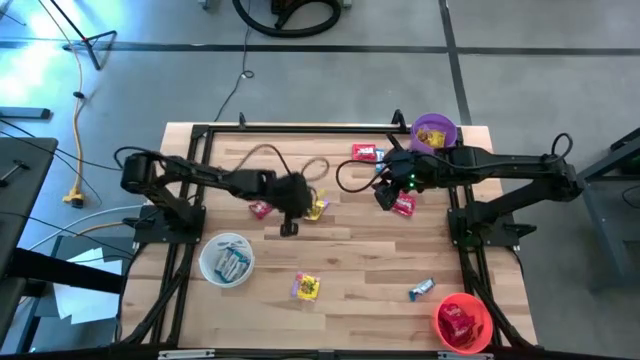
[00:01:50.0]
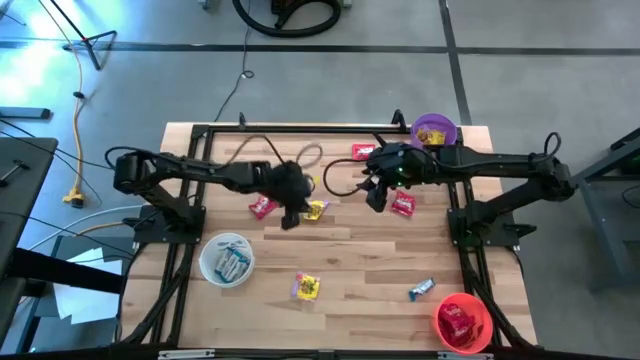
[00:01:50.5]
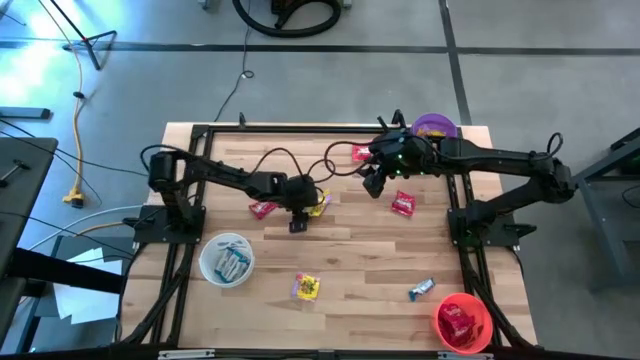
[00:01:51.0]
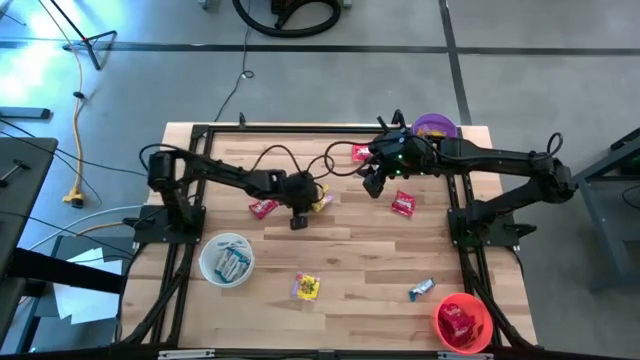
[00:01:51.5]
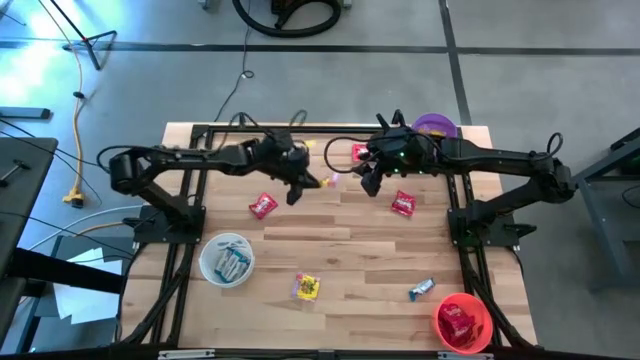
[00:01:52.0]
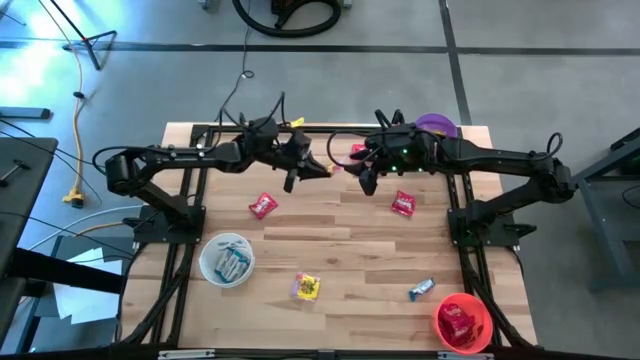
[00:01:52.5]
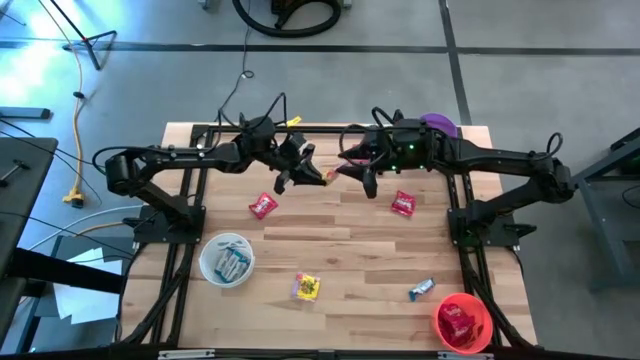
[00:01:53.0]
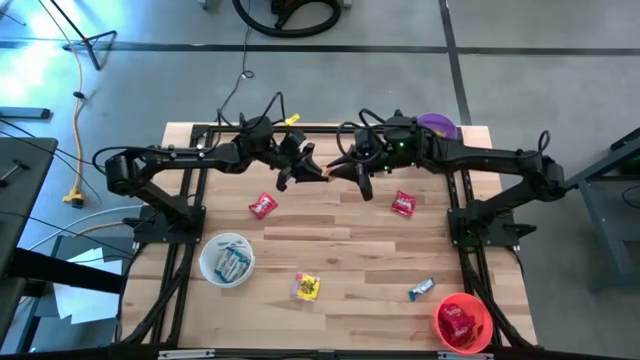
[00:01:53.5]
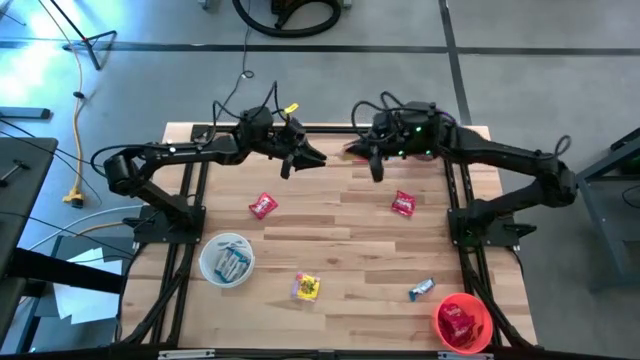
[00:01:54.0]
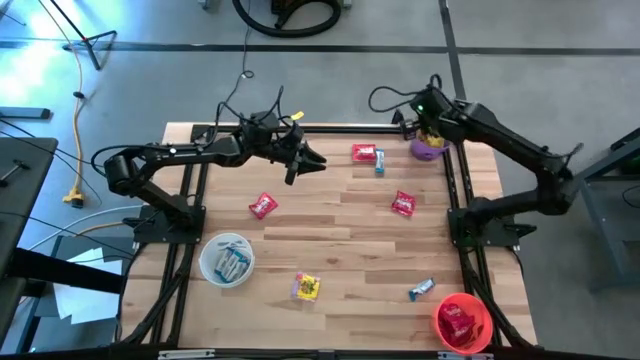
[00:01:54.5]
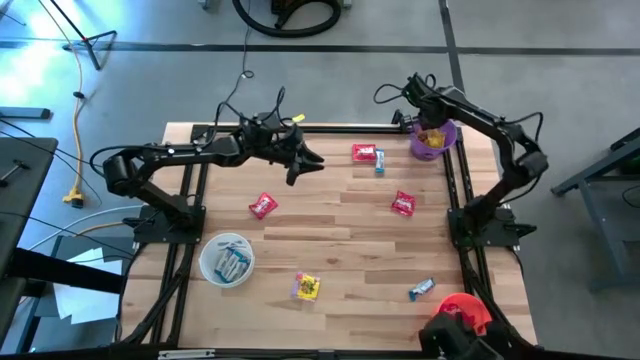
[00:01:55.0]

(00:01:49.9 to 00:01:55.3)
Task: Sort candy
Put the yellow candy into the purple bin

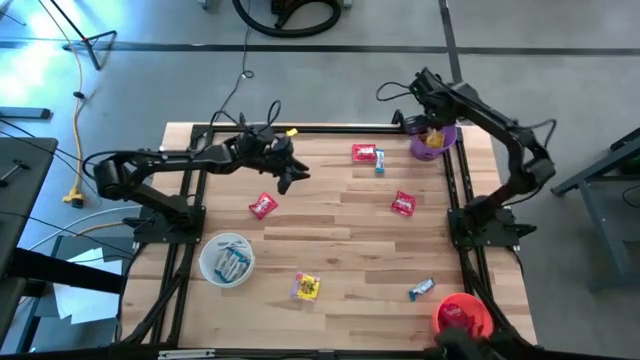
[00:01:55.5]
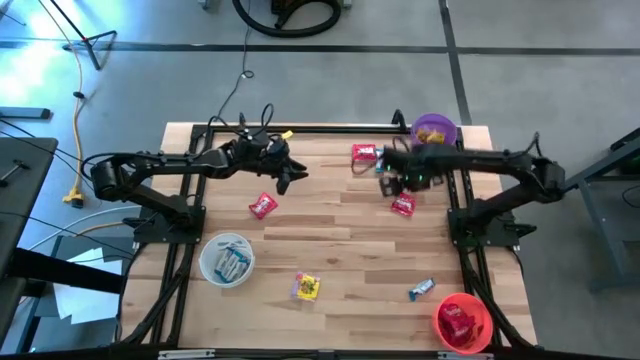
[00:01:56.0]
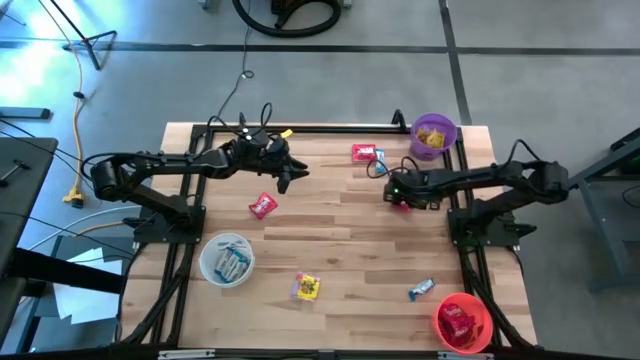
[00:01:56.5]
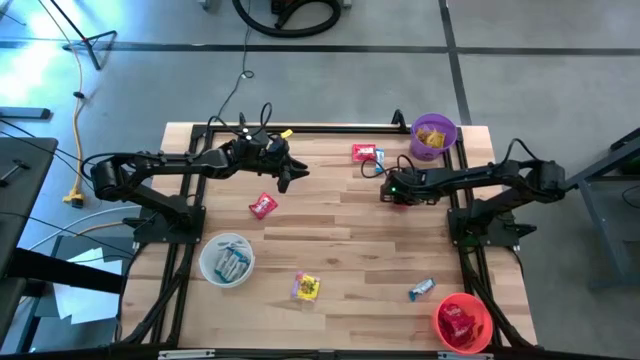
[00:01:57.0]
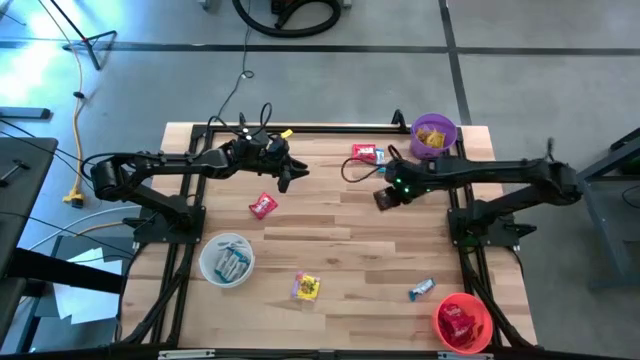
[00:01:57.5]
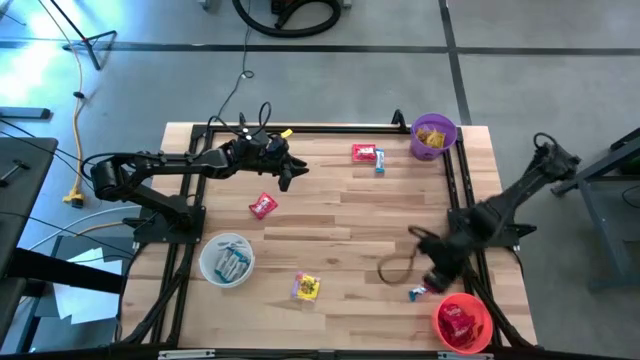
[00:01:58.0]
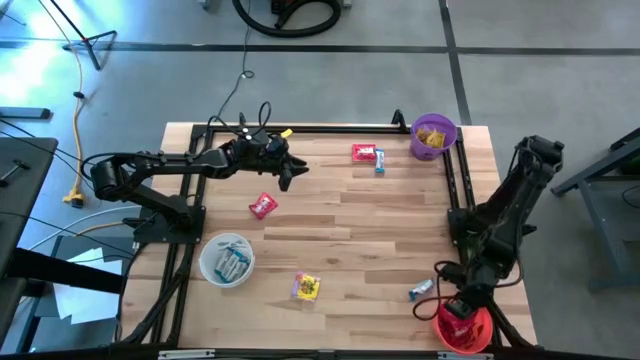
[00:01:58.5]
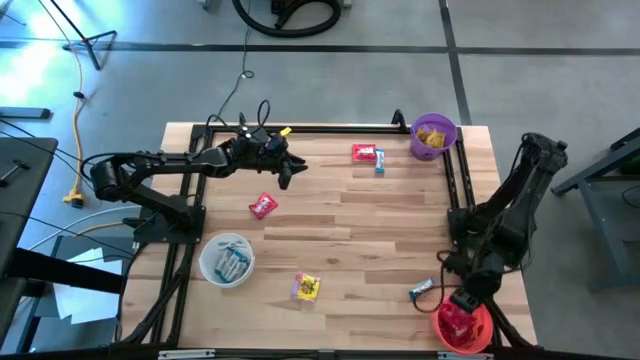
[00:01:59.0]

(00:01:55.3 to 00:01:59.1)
Put the red candy into the orange bin

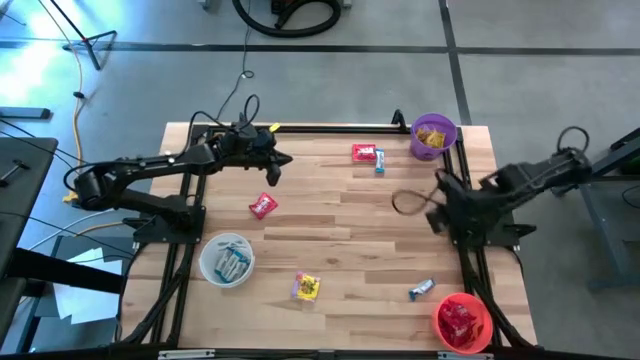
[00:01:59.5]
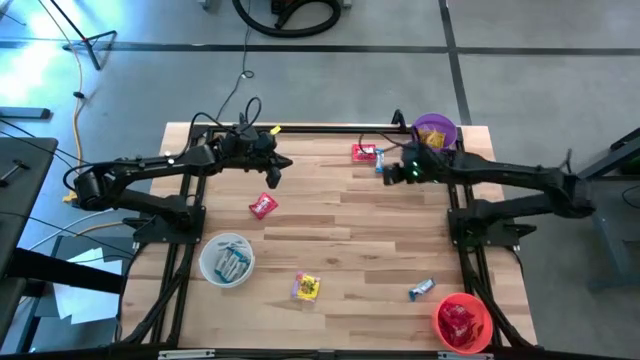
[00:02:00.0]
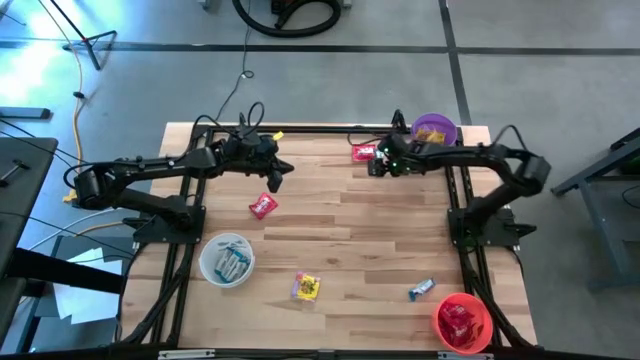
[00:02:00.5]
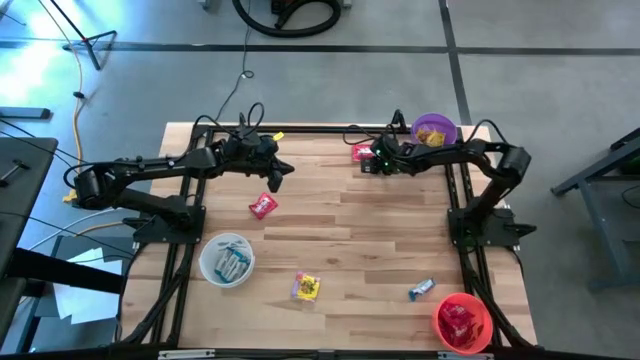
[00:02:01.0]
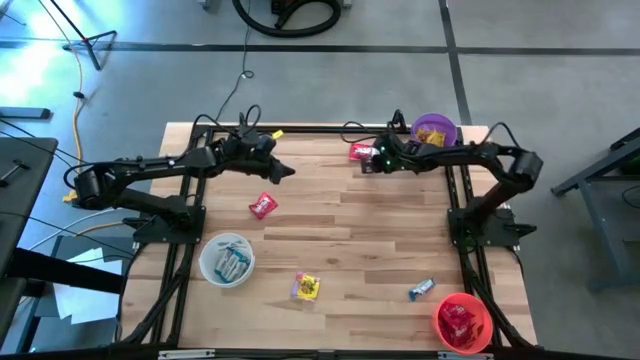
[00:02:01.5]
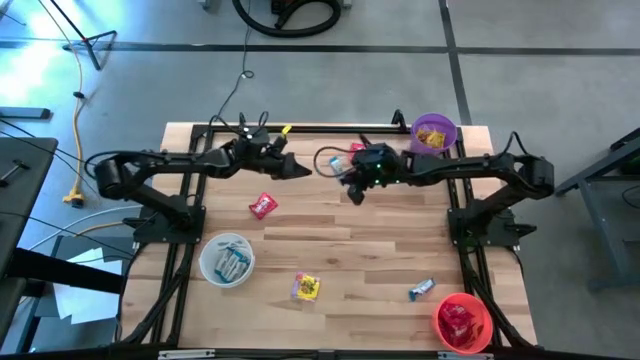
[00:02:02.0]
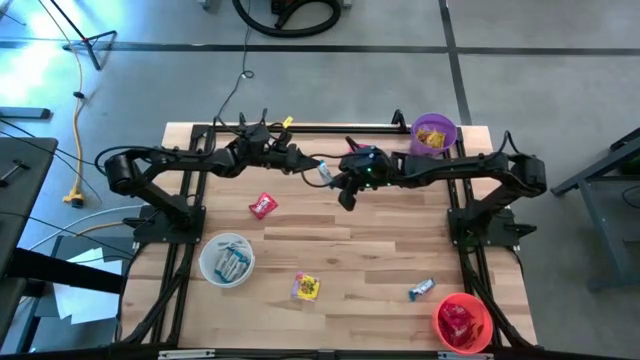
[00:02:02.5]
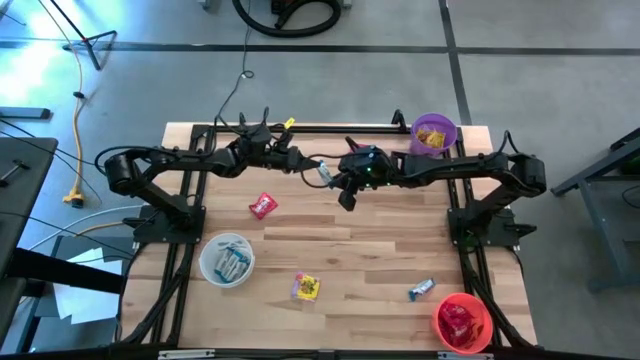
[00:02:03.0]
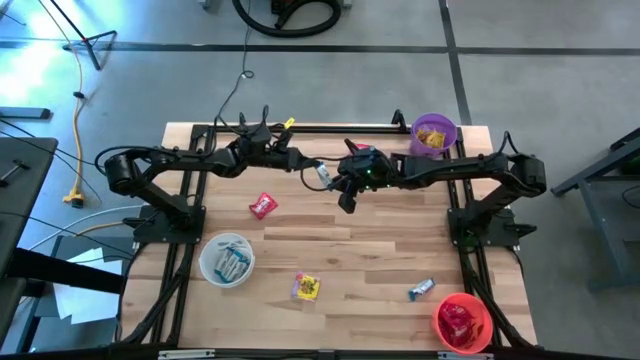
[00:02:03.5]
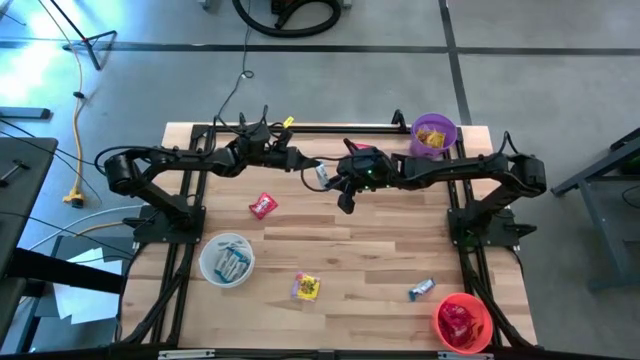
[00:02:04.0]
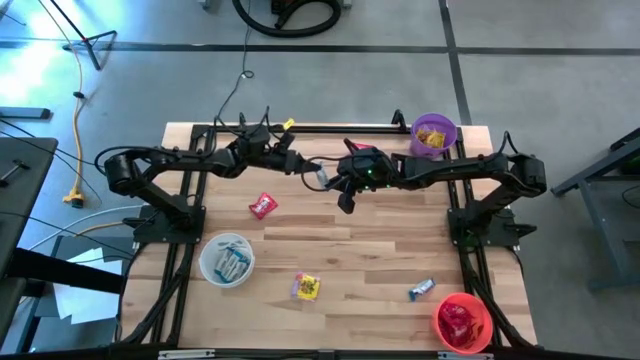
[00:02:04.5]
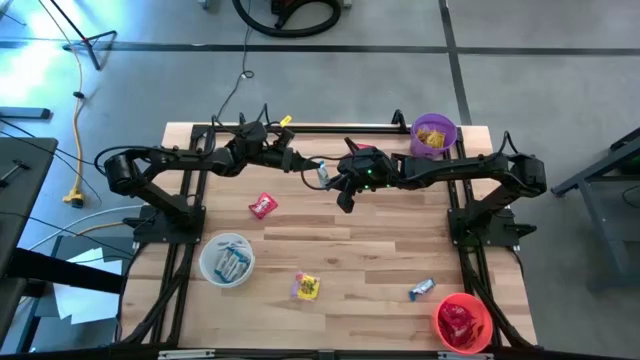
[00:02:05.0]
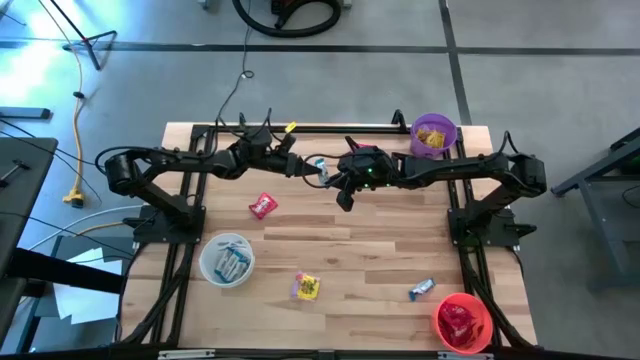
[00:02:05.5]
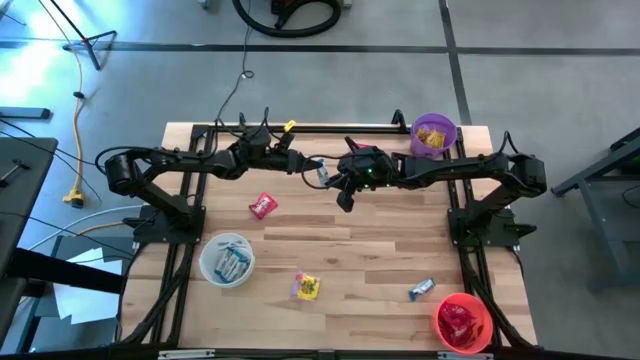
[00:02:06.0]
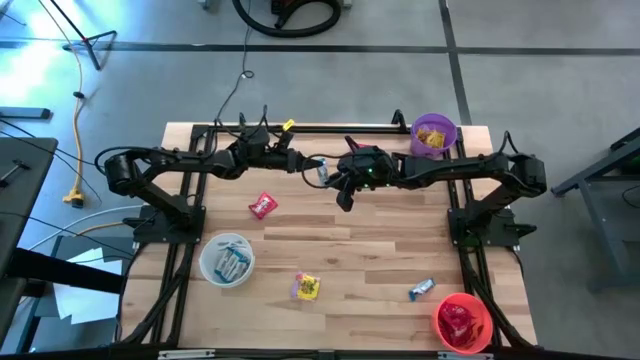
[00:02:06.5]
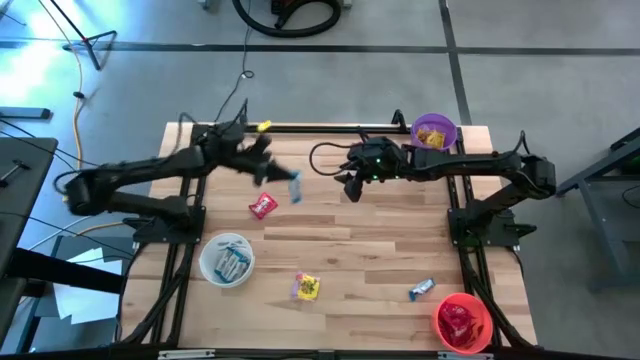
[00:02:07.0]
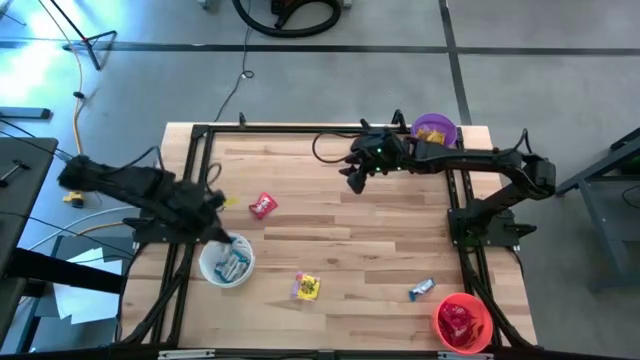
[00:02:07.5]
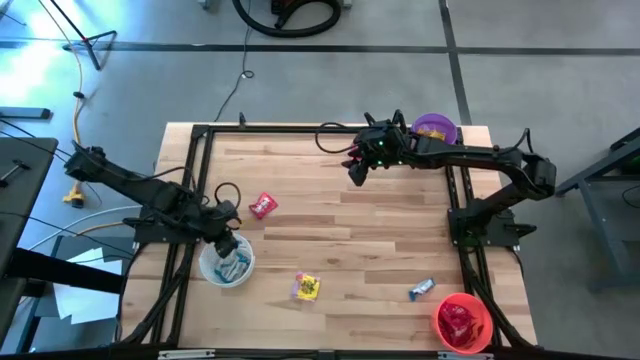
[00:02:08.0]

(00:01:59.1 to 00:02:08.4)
Put the white chocolate bar into the white bin

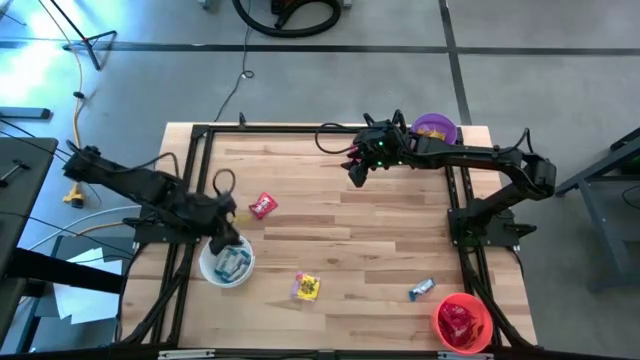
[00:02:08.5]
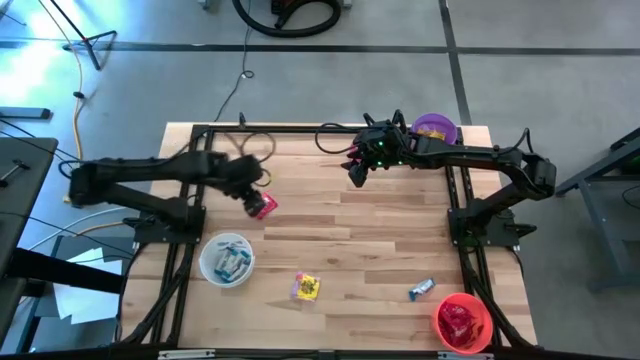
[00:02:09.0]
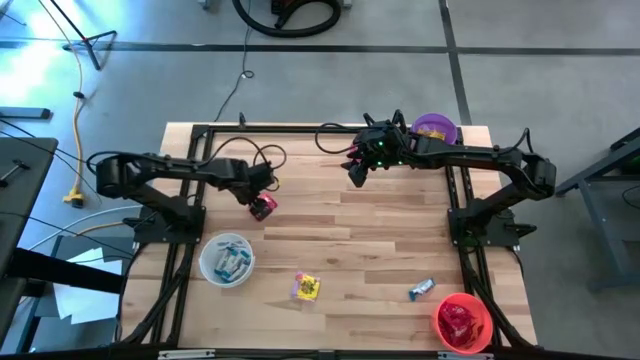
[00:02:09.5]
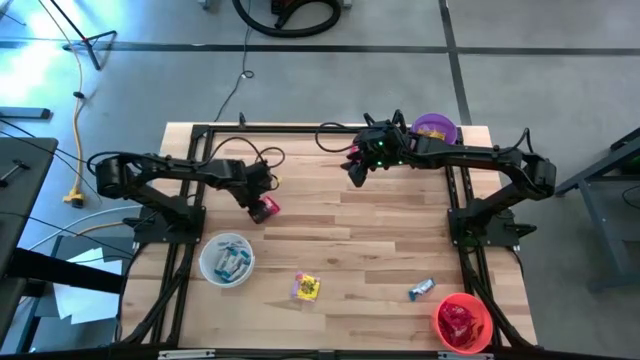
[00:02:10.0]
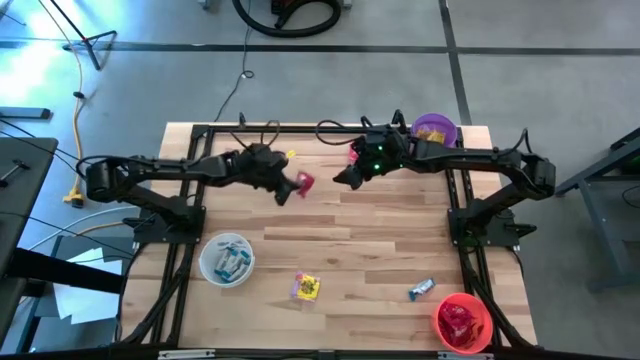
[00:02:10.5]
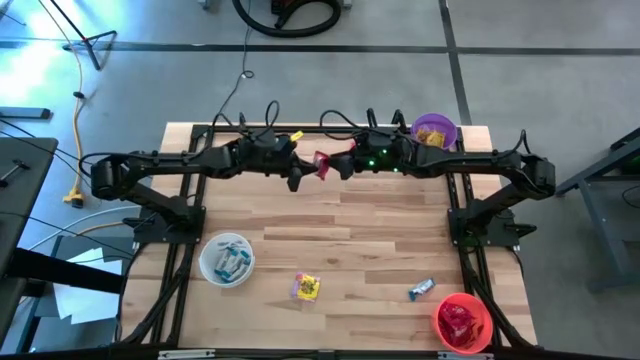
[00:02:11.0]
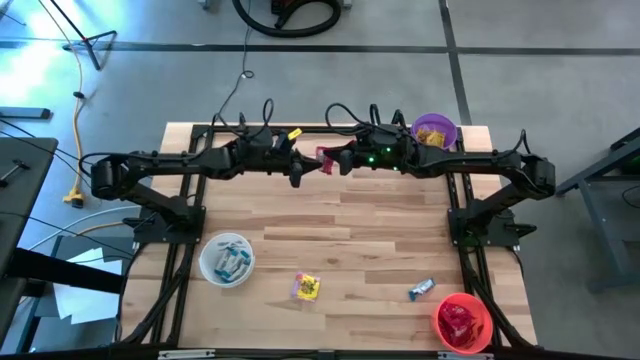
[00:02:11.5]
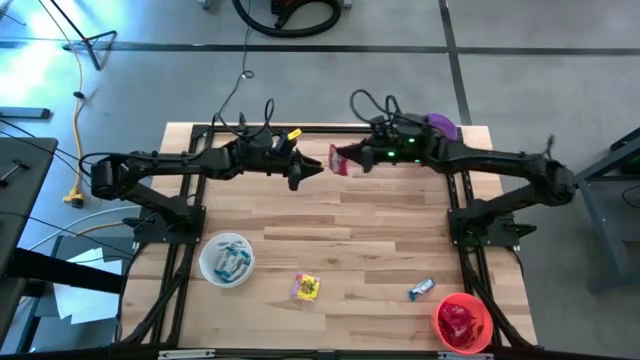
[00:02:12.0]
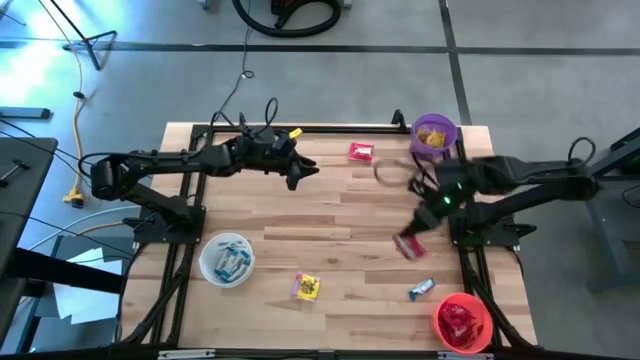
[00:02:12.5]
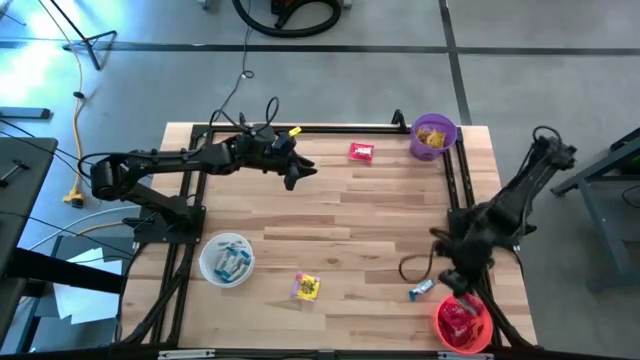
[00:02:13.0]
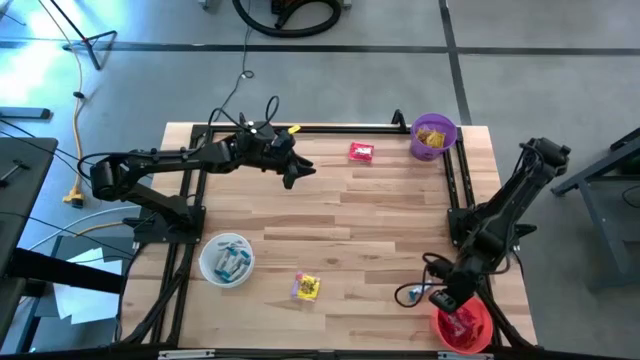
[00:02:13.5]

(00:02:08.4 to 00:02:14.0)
Put the red candy into the orange bin
